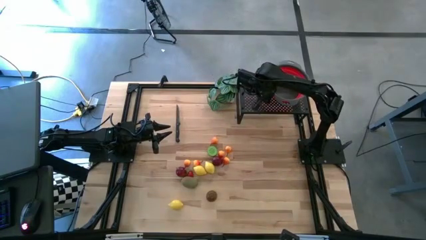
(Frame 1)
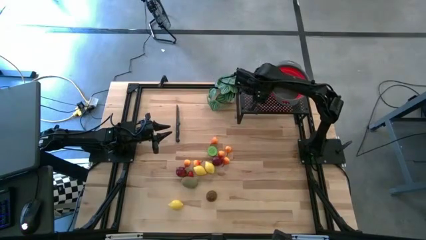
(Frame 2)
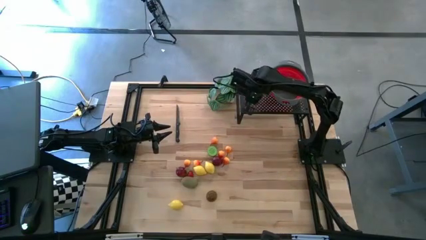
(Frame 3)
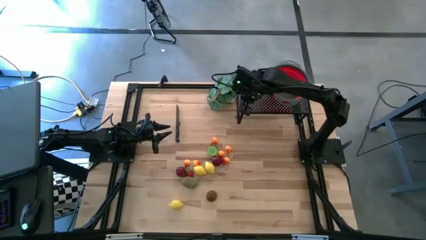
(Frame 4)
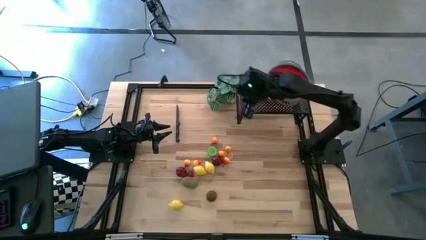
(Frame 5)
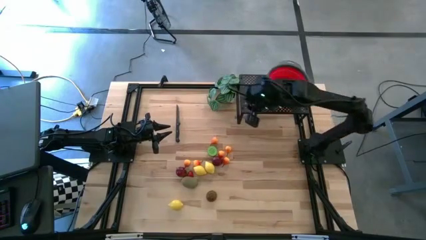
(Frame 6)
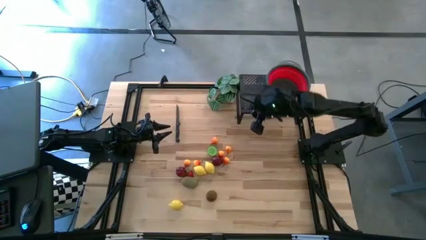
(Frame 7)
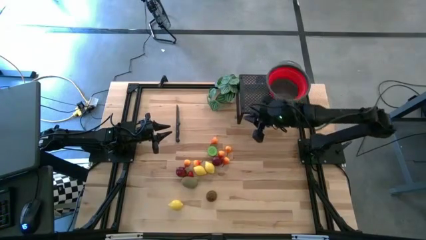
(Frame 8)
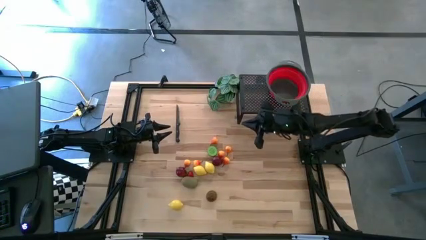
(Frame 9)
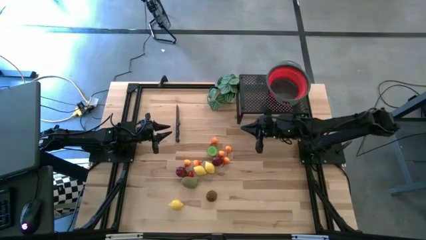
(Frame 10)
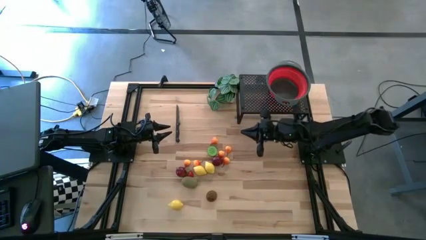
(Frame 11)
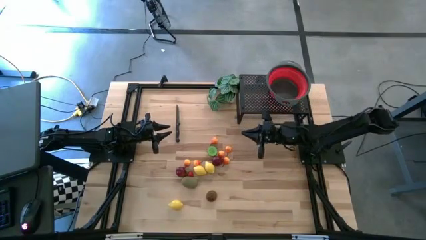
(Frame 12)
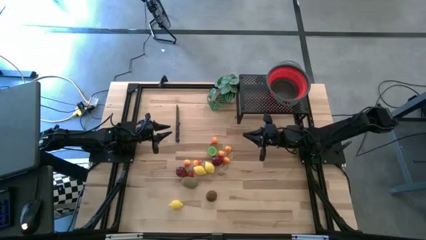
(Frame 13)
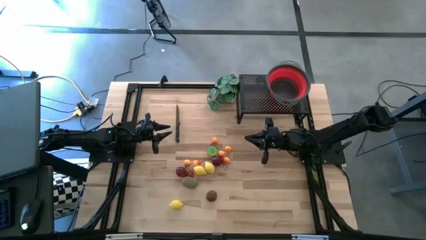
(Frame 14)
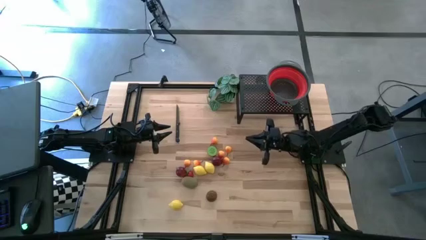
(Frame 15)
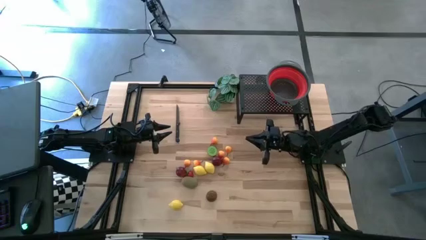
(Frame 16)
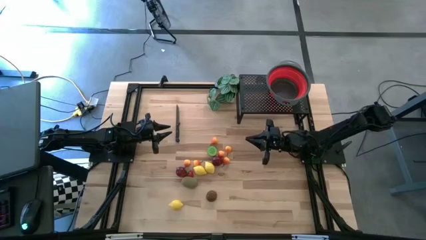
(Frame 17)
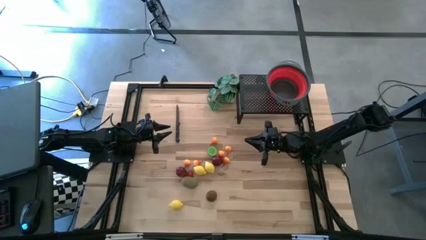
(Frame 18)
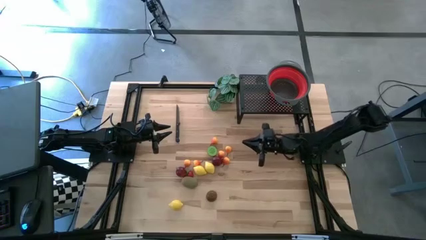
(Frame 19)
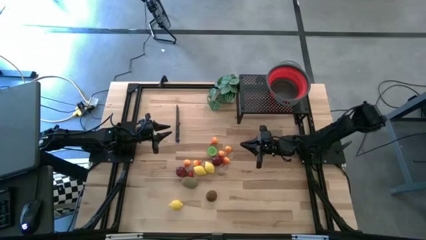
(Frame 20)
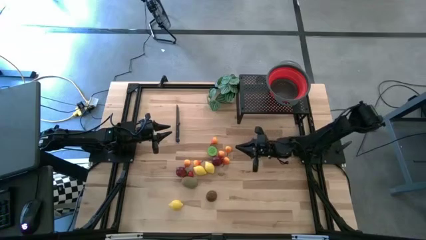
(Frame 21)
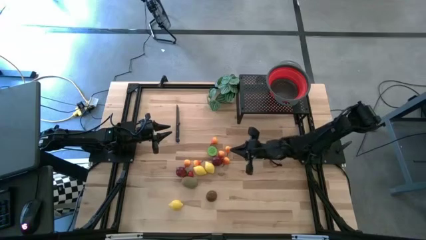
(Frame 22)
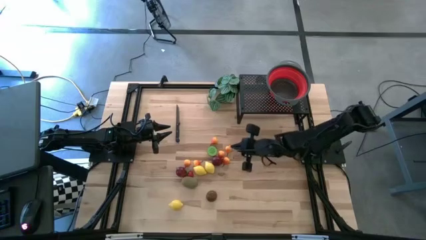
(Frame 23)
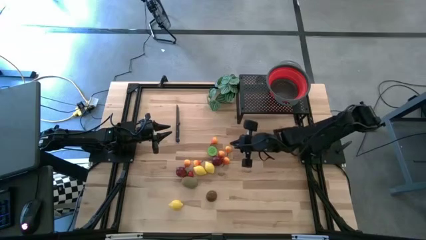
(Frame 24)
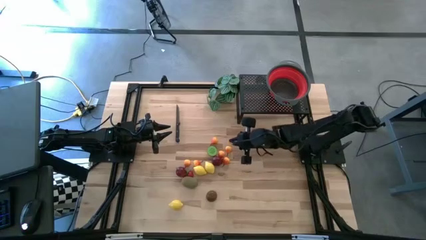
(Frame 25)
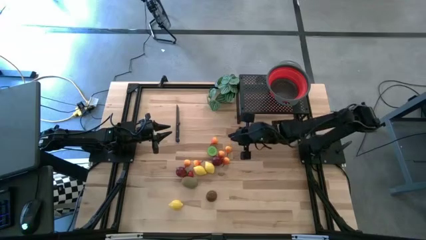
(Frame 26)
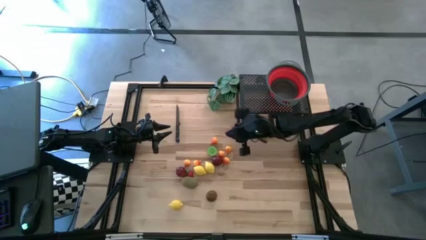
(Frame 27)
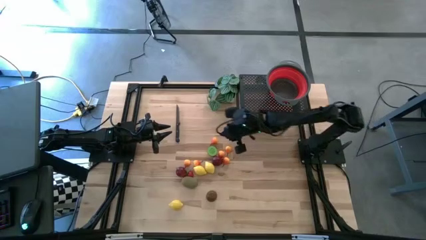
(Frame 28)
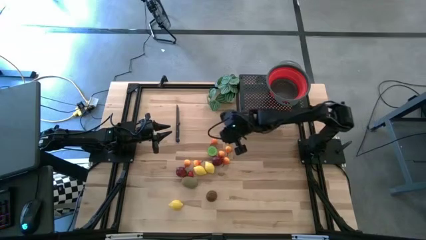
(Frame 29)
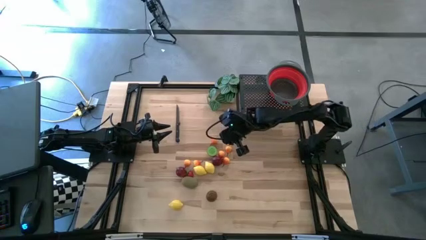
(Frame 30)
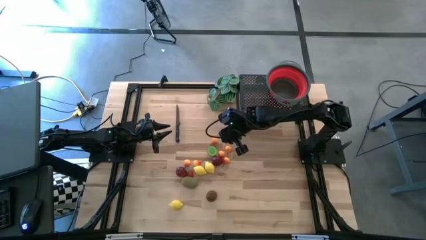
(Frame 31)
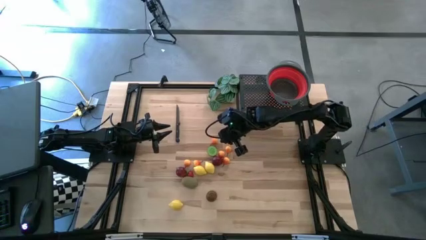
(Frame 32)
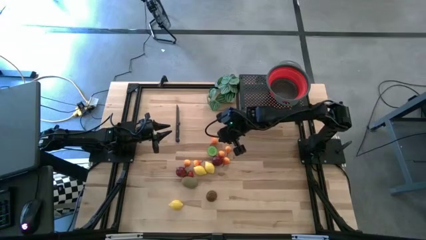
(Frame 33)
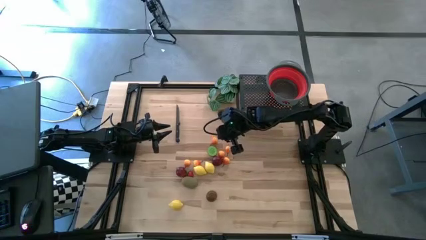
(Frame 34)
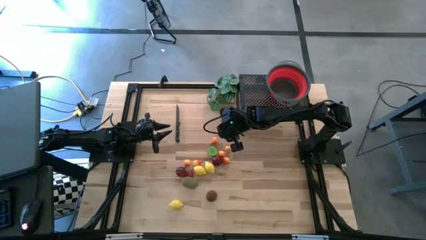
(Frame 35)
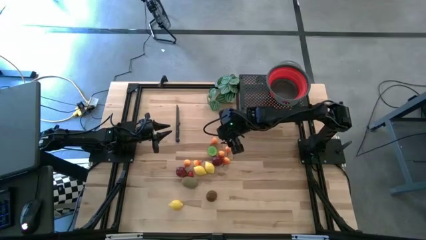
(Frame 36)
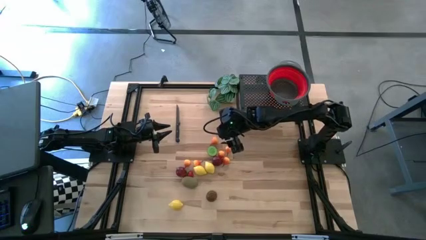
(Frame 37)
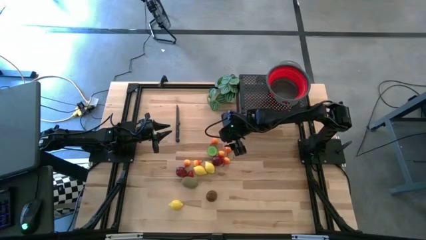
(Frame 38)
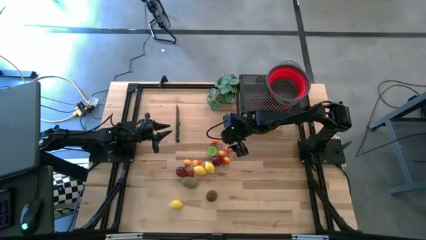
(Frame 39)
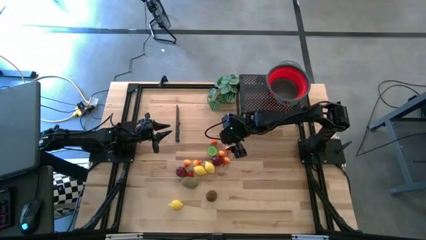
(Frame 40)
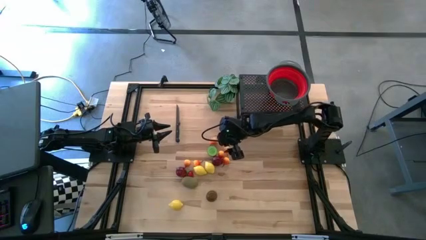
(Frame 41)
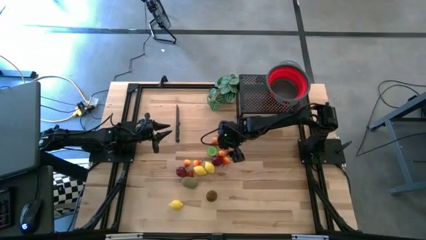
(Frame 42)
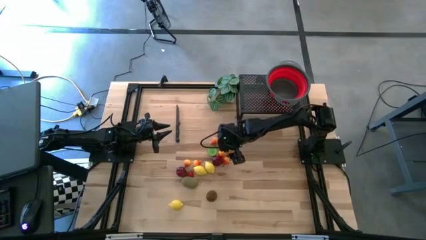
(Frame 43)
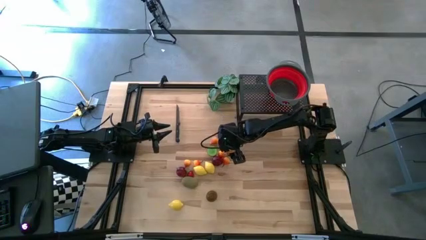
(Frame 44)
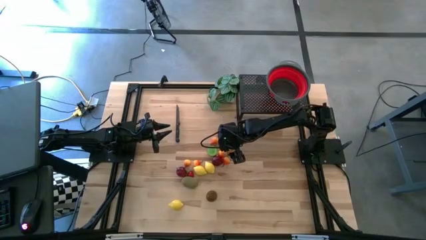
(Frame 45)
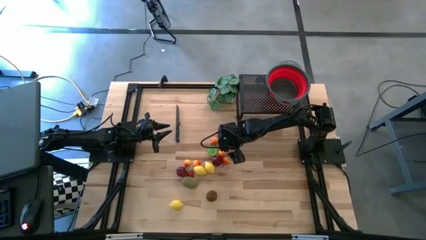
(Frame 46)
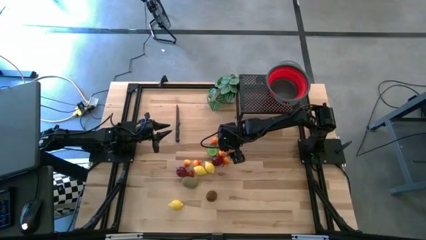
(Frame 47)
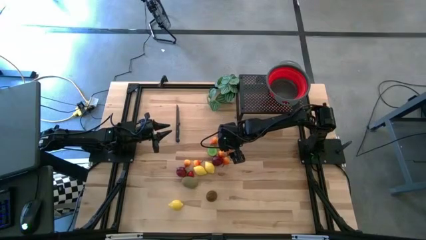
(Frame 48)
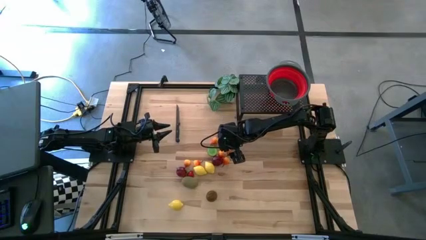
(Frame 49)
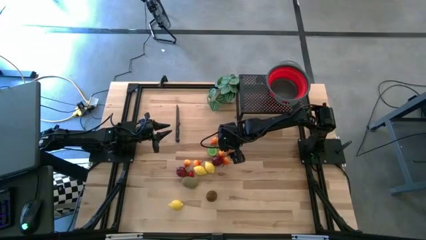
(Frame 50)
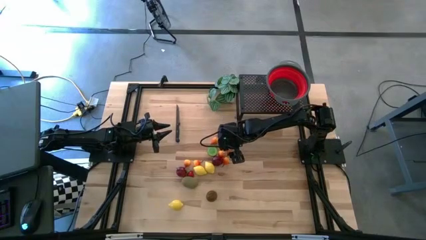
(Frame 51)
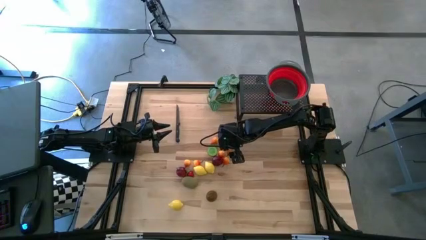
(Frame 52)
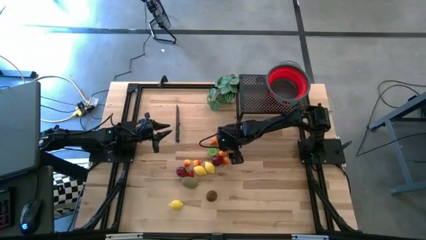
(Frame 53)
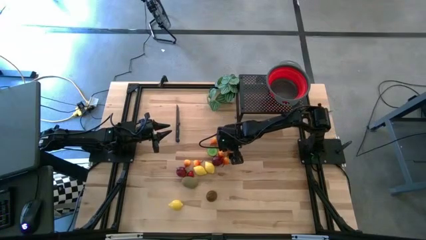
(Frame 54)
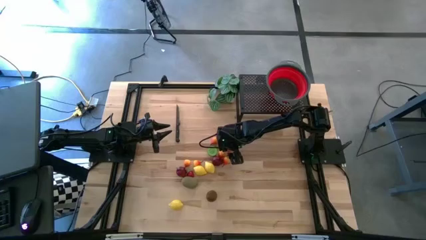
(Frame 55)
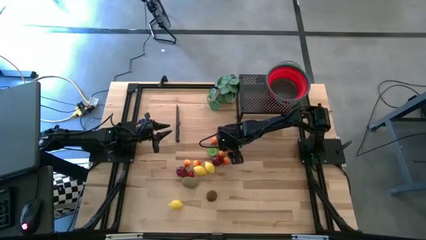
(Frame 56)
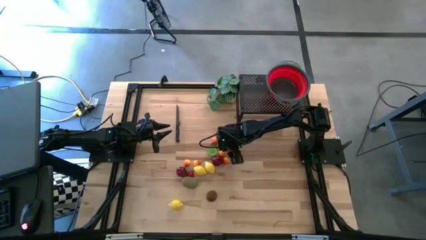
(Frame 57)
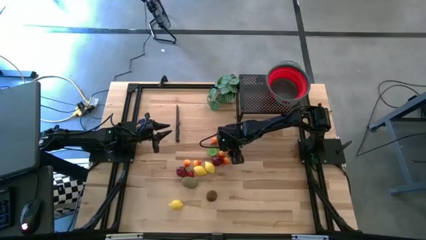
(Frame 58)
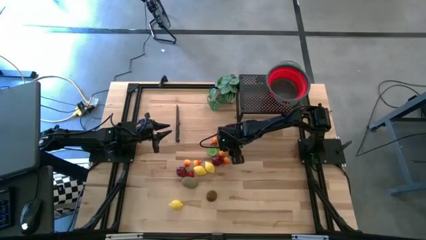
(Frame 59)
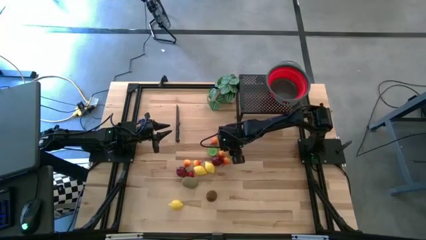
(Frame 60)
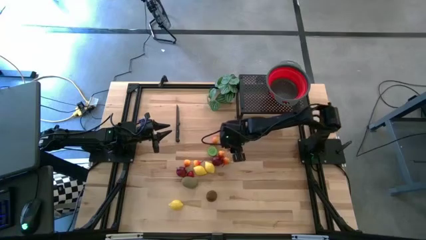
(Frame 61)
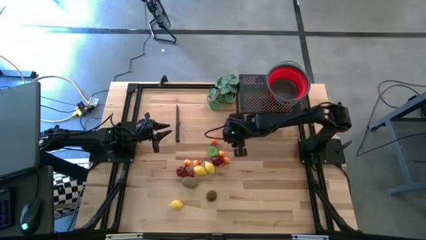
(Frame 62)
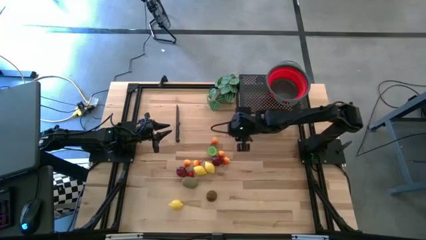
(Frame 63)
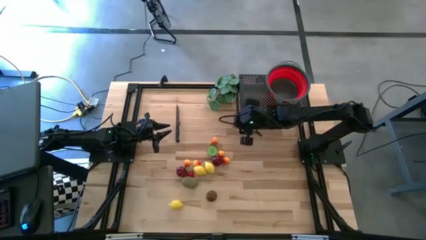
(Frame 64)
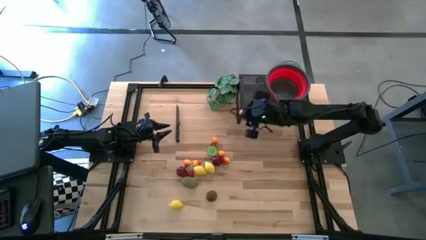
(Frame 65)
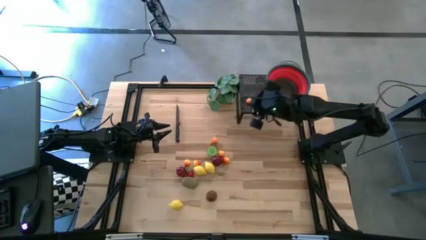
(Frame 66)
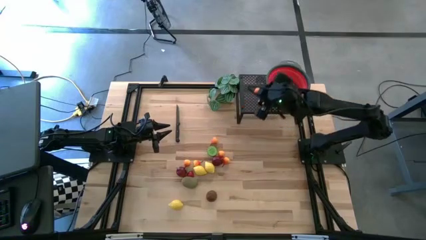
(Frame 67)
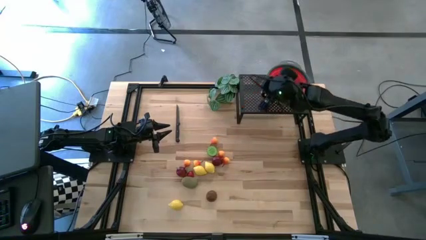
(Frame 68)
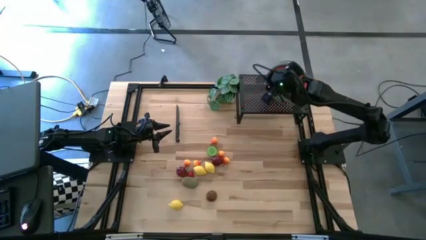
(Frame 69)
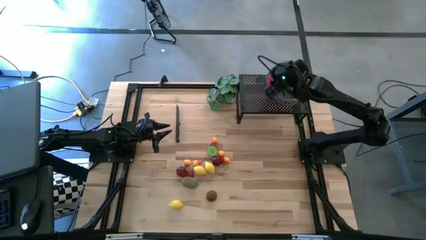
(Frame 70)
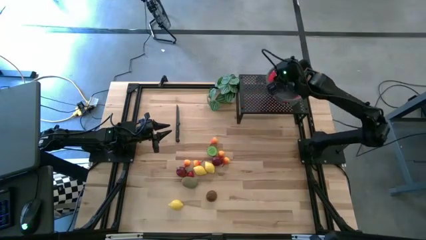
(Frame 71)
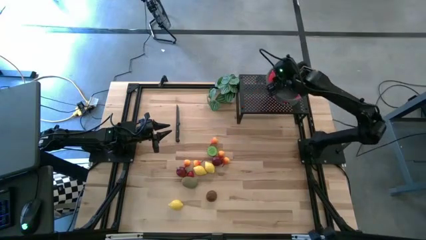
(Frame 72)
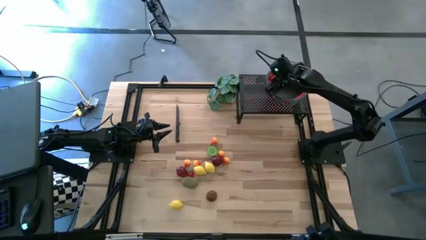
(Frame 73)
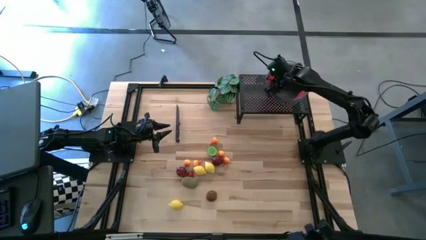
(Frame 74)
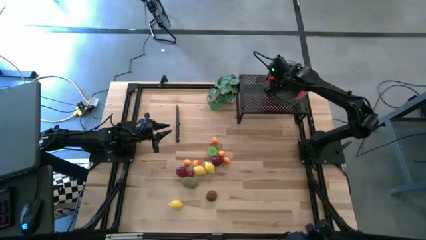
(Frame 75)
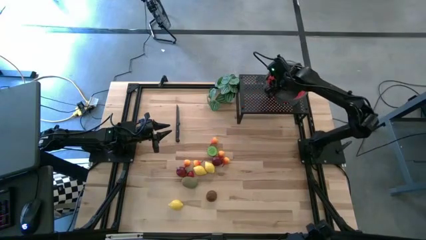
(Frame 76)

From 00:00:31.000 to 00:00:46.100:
Task: Pick & Place Fruit
Put the orange pear into the red strainer bowl

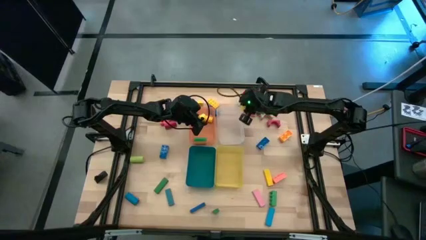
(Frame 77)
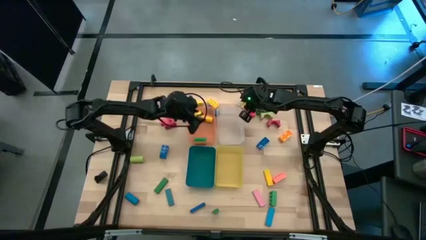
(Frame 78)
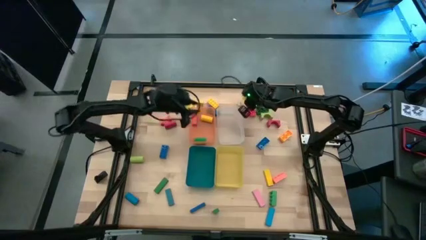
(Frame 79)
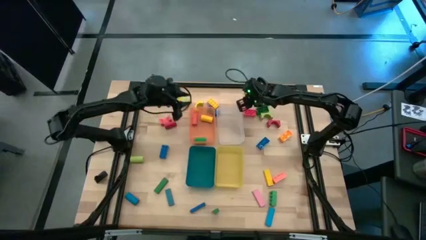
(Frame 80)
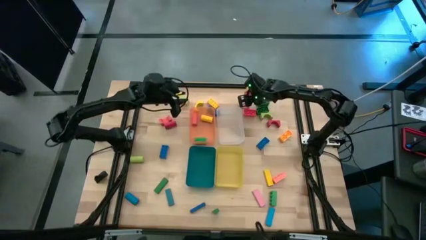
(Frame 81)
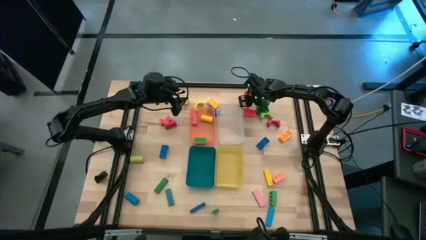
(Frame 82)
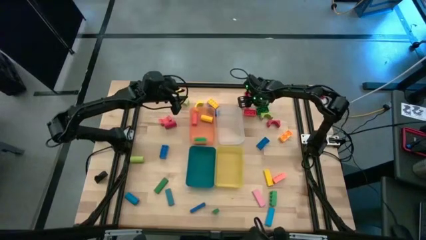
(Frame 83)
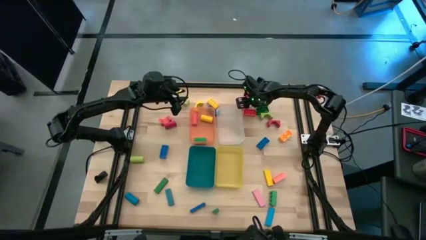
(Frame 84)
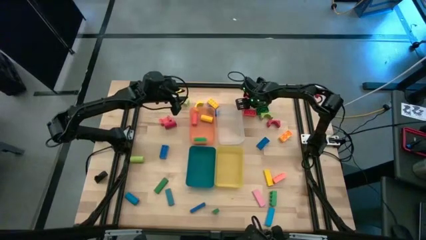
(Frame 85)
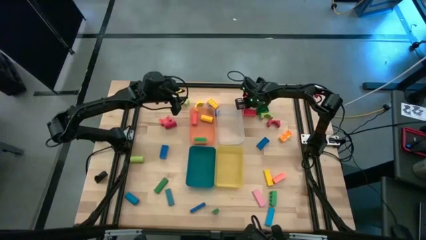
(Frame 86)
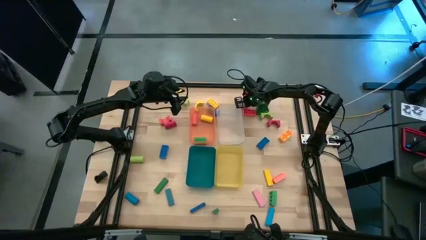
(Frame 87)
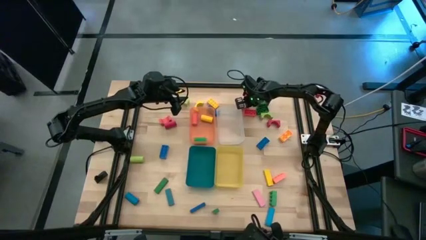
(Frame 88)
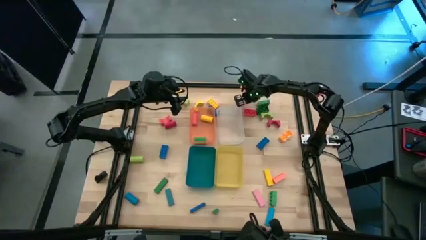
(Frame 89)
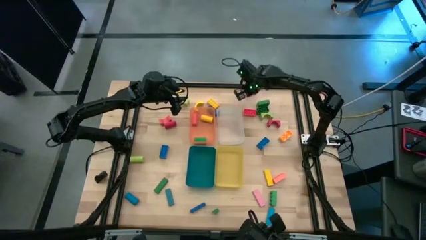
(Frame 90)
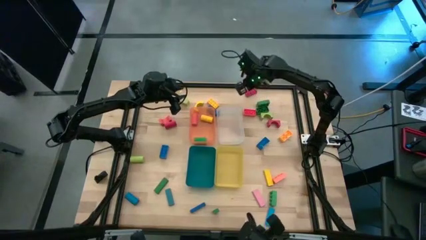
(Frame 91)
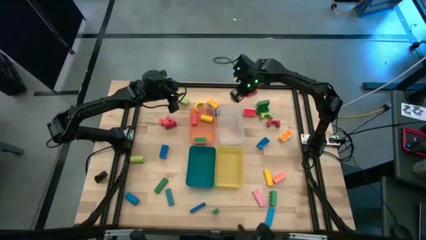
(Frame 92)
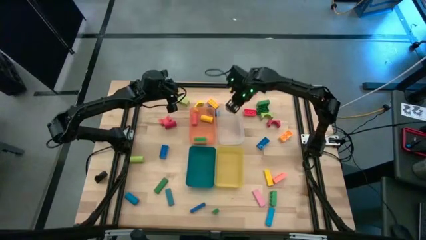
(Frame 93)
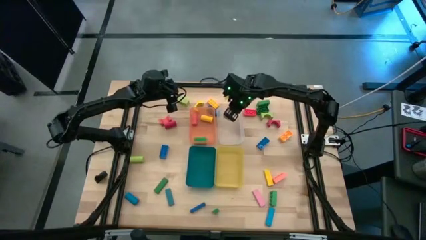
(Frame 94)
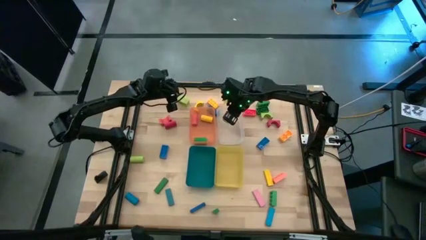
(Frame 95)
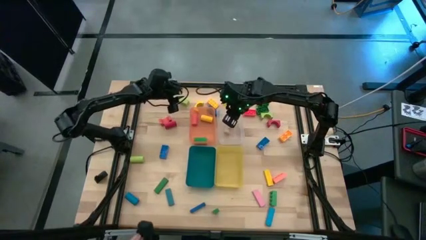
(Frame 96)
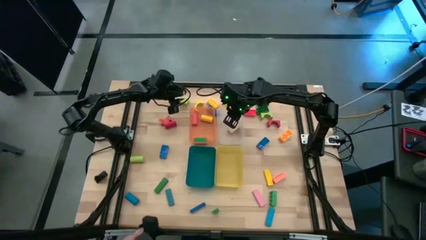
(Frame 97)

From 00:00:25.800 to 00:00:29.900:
Task: Sort blocks by size
Put the brown arch block into the transparent bin
